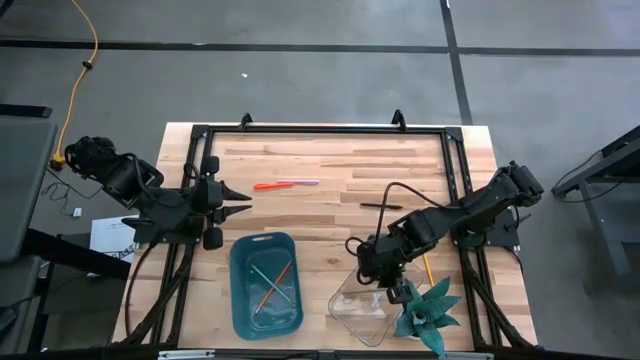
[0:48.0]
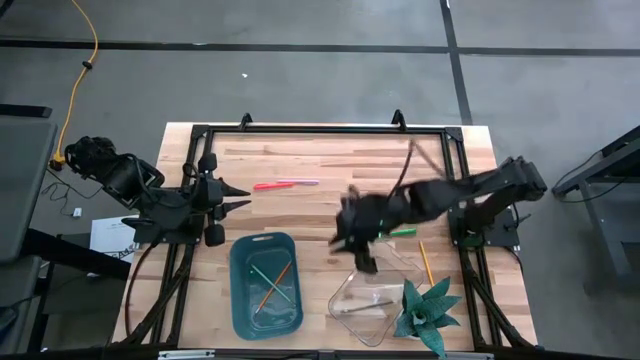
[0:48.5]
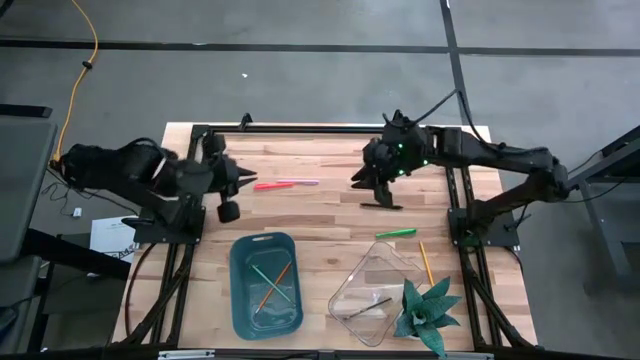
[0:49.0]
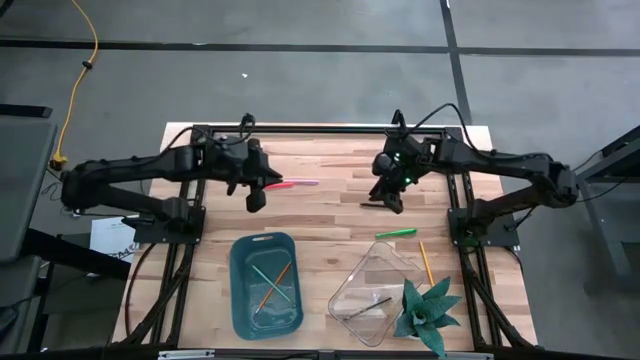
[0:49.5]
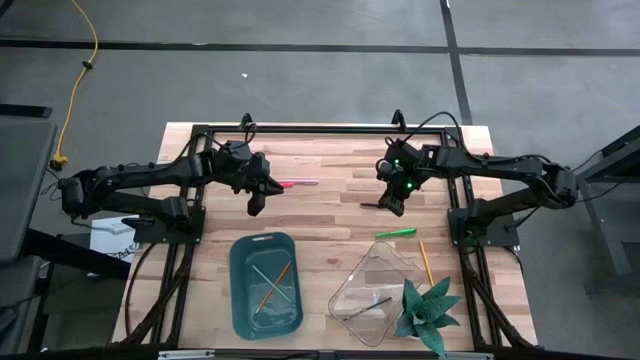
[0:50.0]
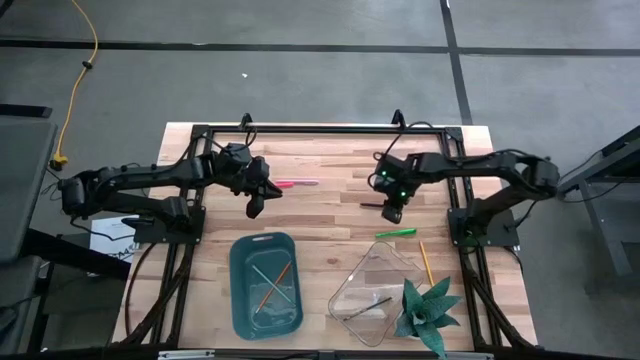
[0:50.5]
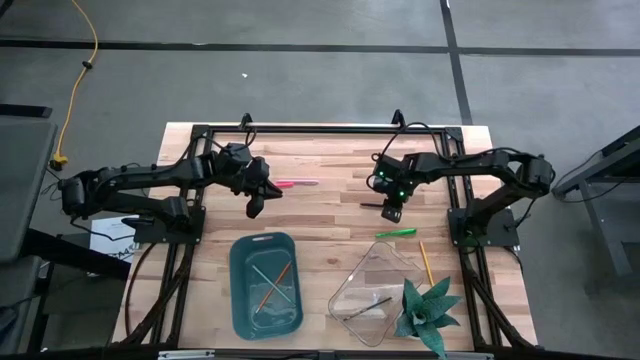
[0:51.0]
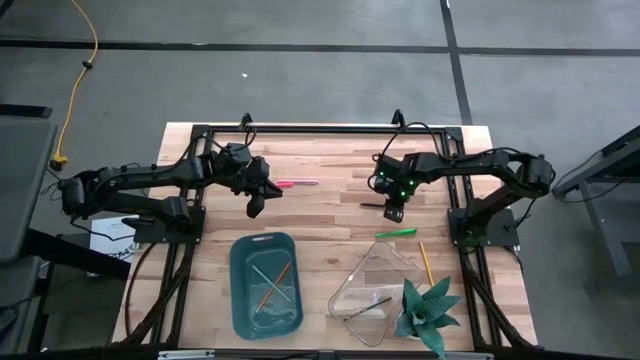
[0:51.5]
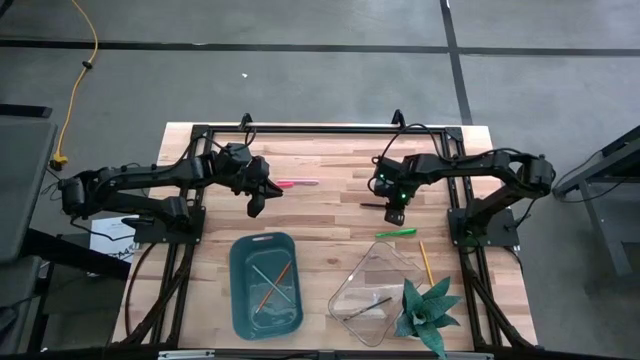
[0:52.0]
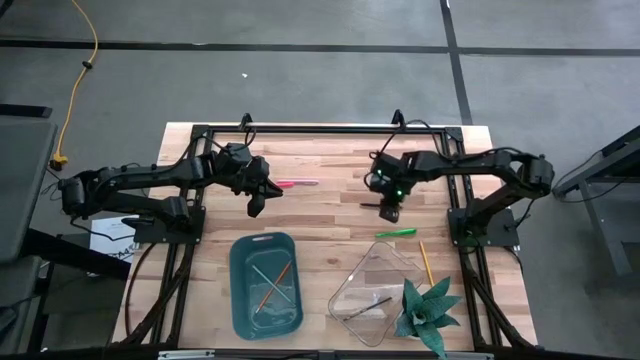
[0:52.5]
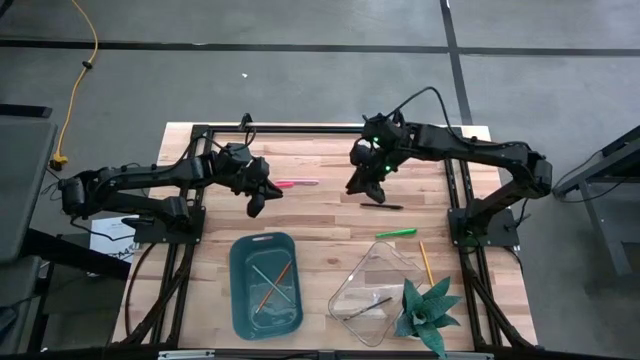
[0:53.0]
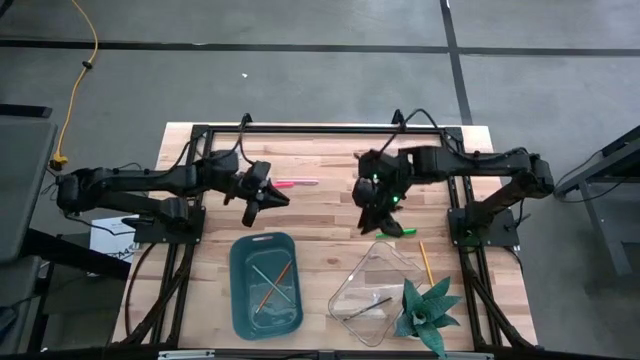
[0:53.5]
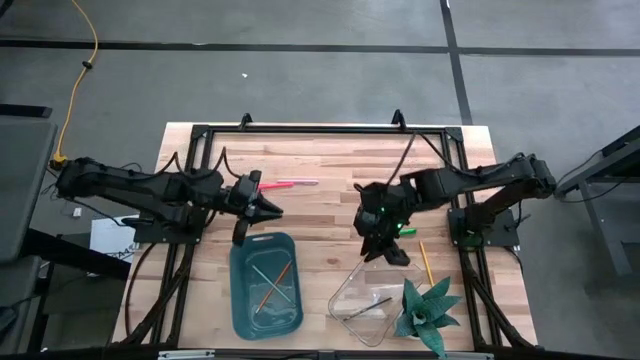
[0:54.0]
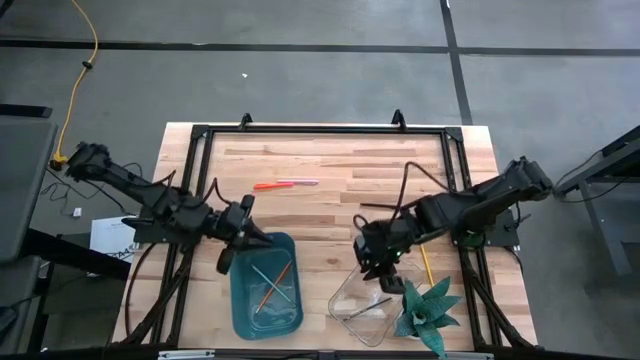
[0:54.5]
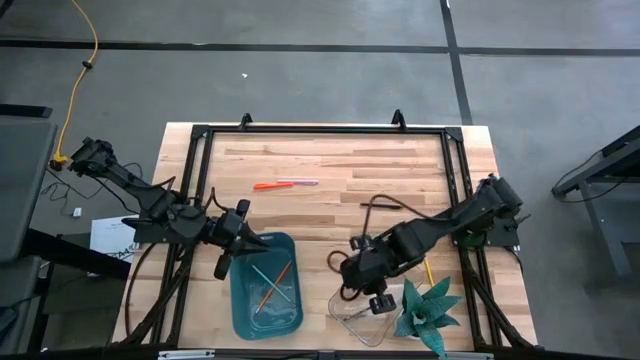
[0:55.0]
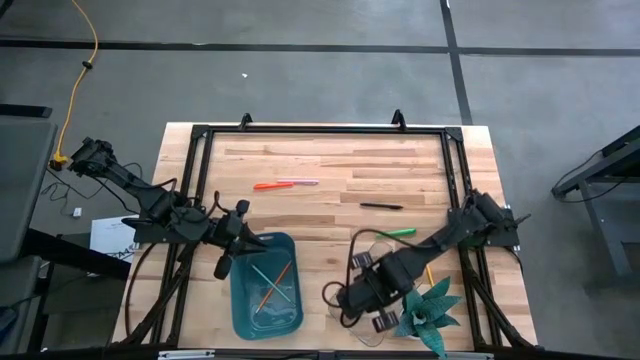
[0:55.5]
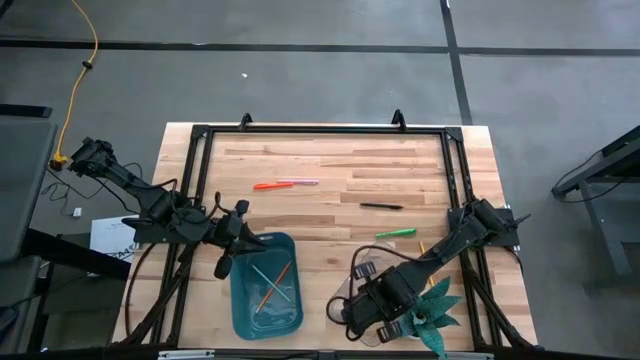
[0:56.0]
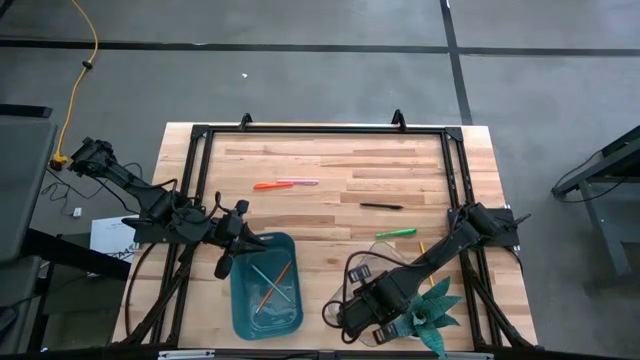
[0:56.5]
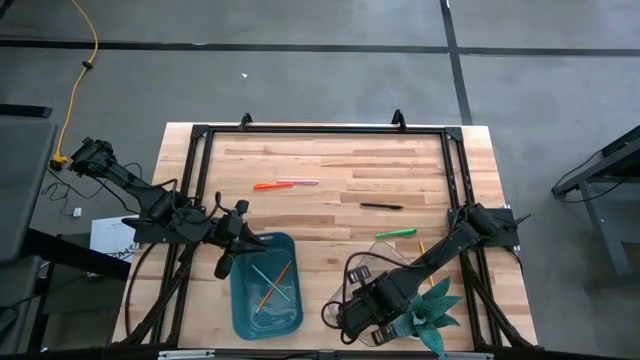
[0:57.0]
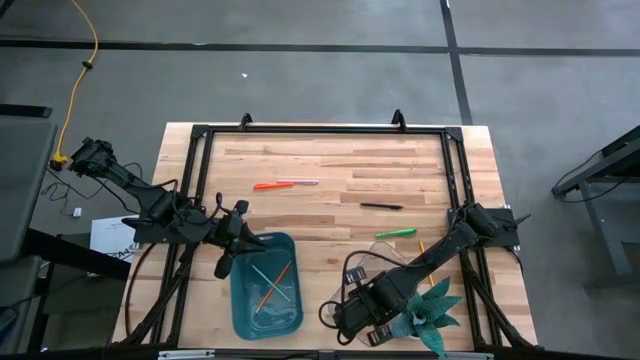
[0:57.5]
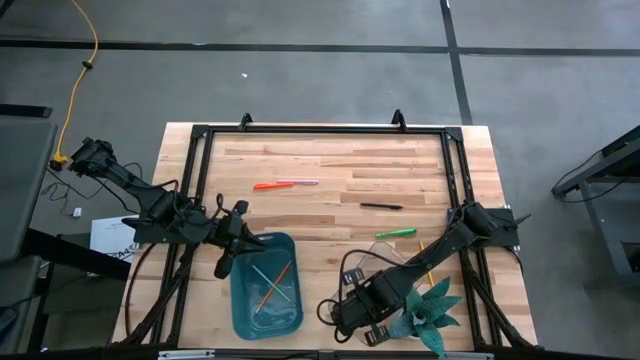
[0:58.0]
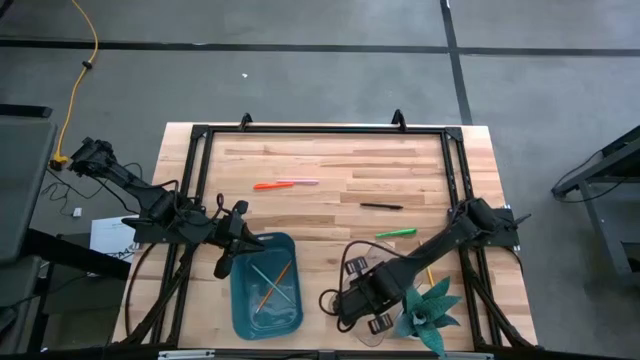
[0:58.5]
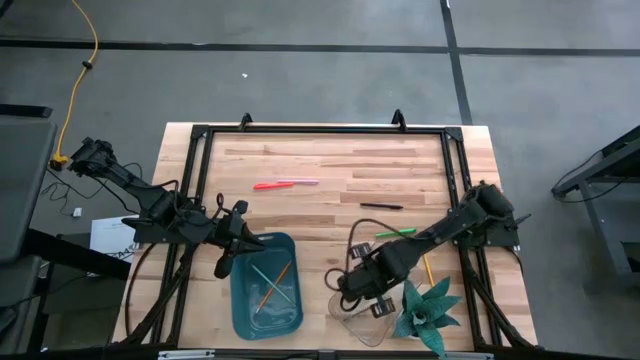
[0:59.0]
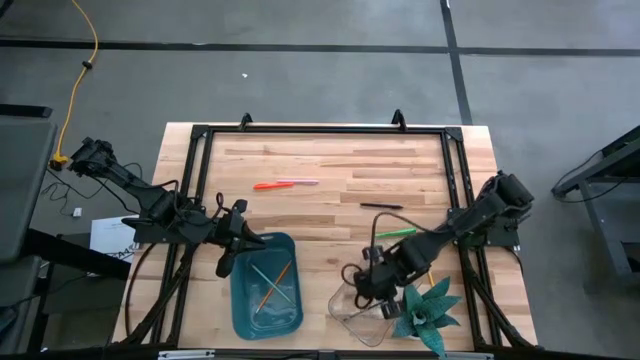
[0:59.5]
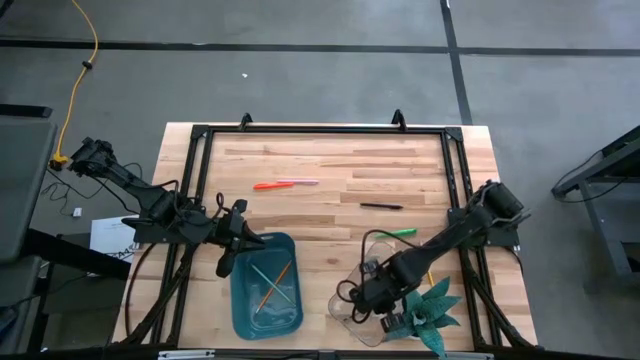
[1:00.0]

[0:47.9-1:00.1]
Task: Sort pens & pencils
Put the dark blue pencil into the blue bin

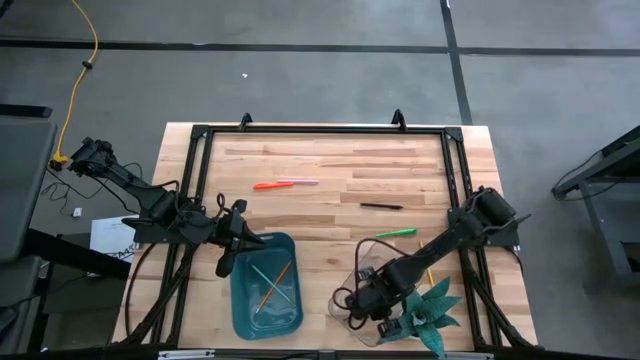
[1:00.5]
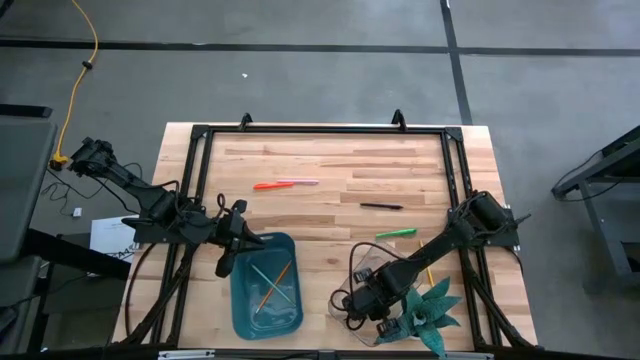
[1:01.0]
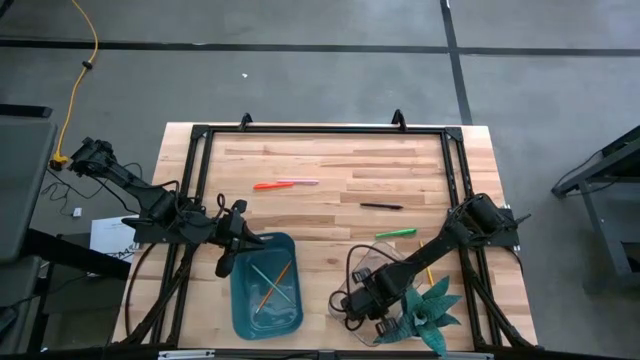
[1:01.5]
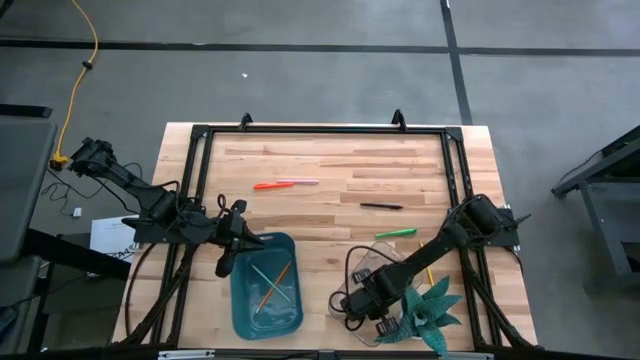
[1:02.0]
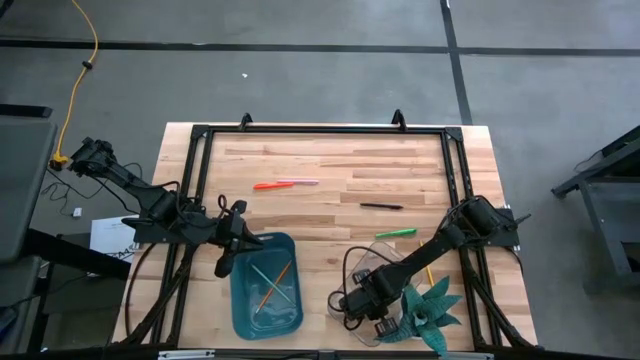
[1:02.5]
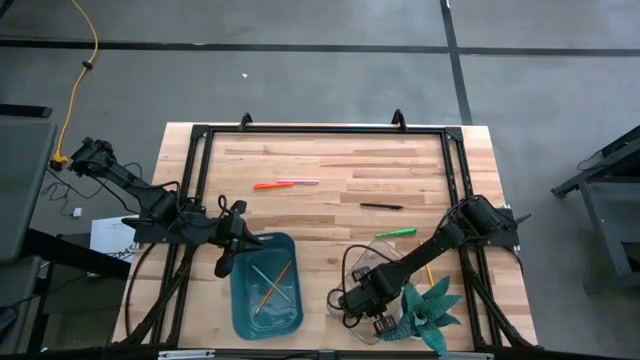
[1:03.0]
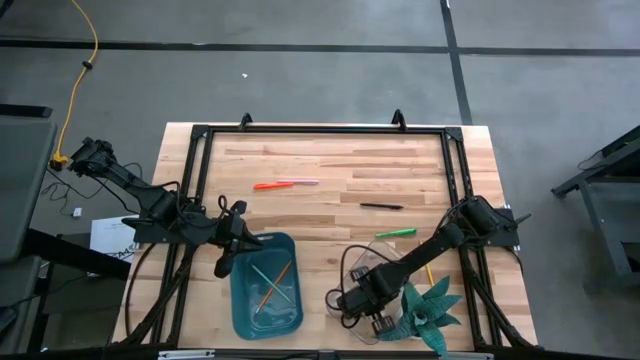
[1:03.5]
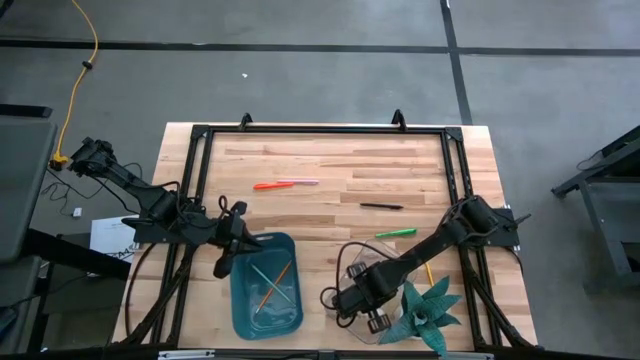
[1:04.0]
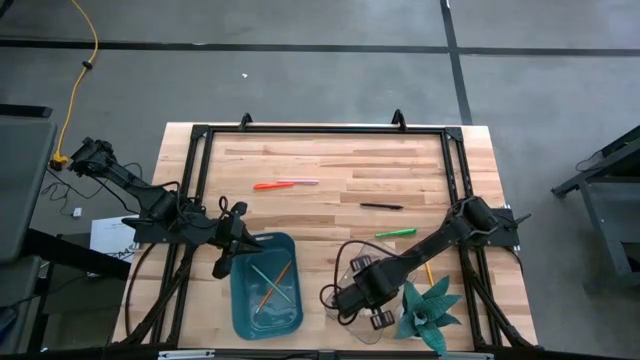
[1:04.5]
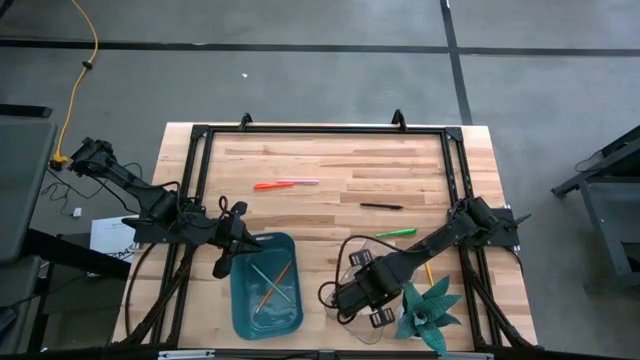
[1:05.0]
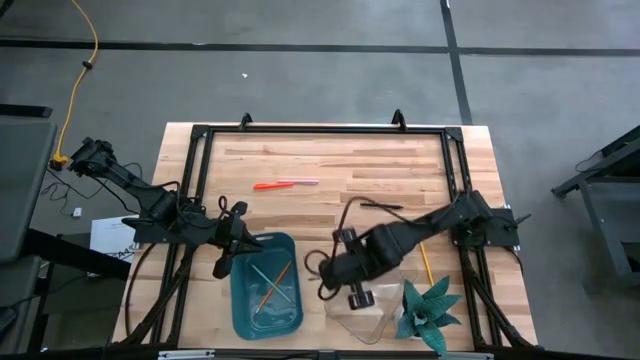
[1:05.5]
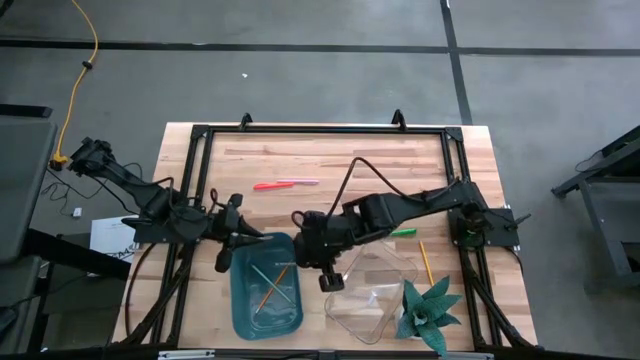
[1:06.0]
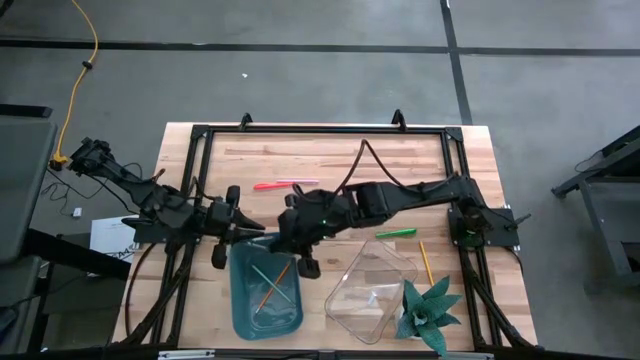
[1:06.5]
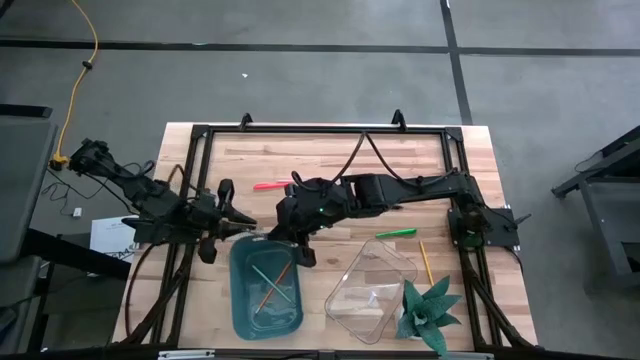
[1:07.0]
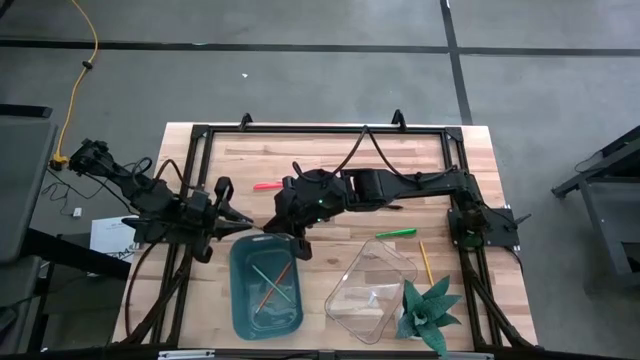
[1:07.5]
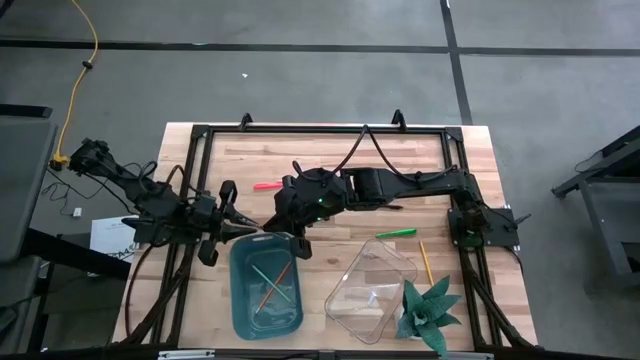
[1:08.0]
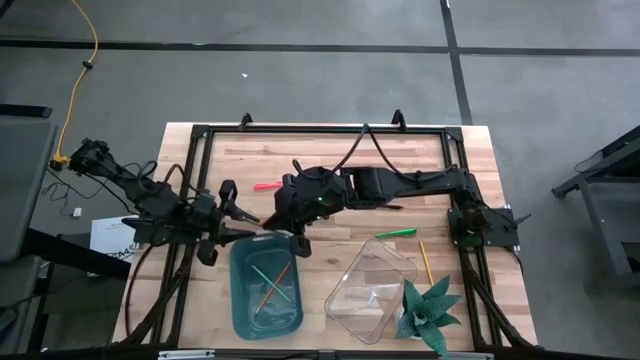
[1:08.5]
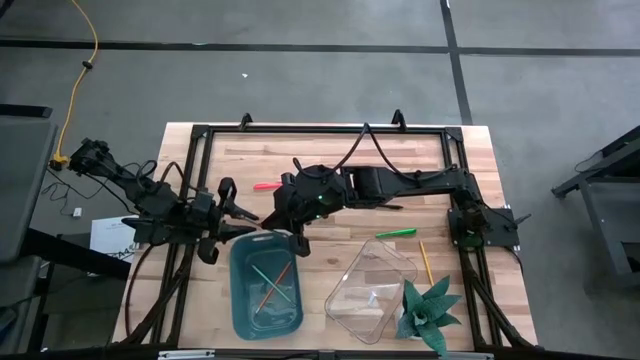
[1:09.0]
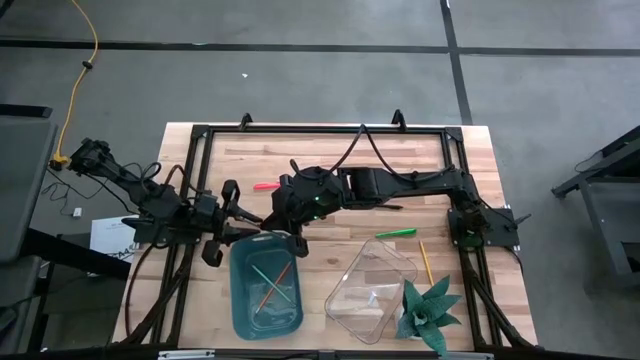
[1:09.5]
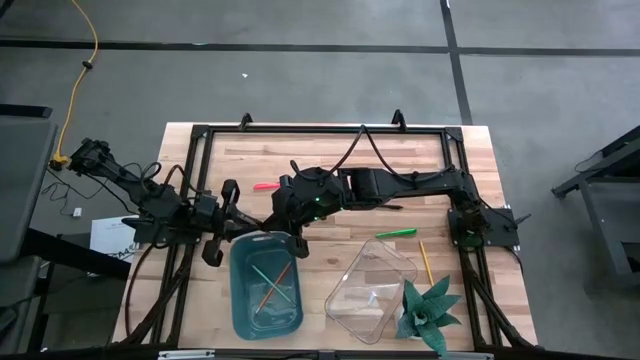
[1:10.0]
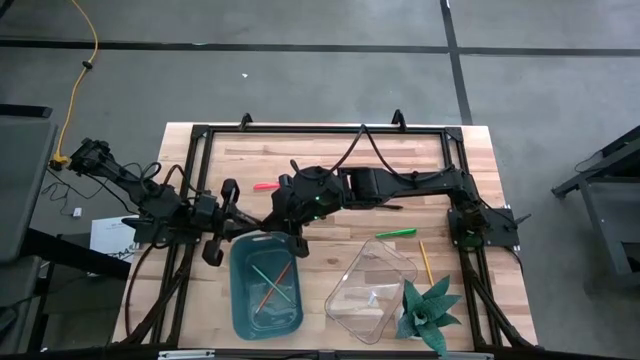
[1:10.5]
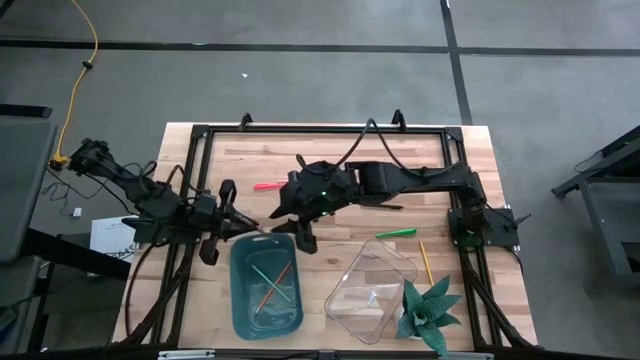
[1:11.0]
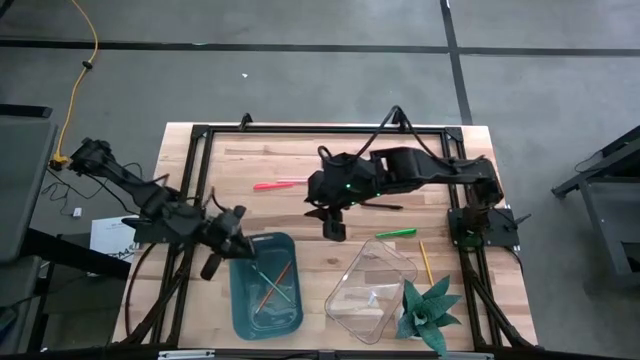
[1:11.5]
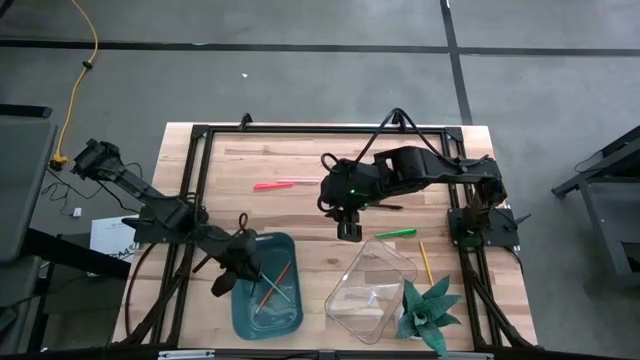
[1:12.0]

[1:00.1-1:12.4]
Put the dark blue pencil into the blue bin
